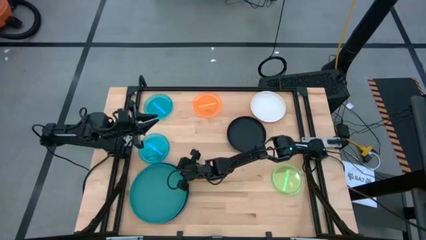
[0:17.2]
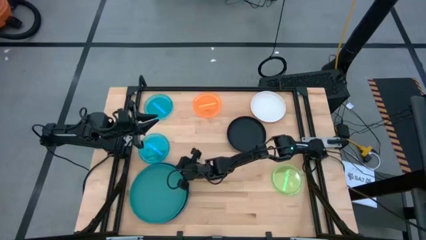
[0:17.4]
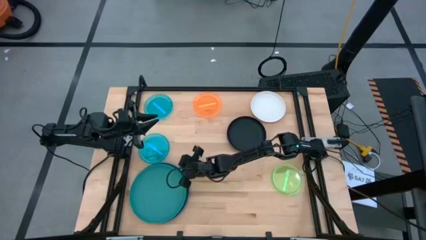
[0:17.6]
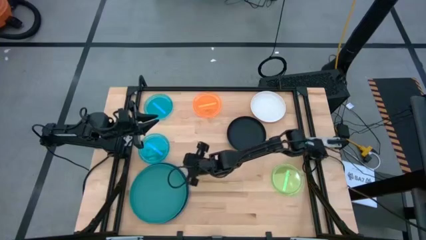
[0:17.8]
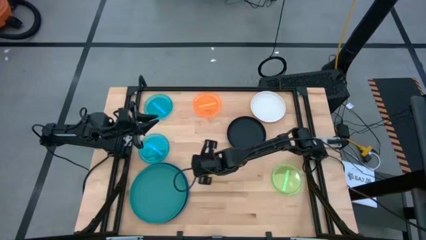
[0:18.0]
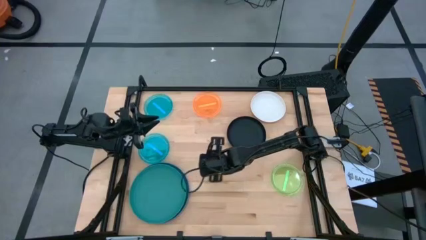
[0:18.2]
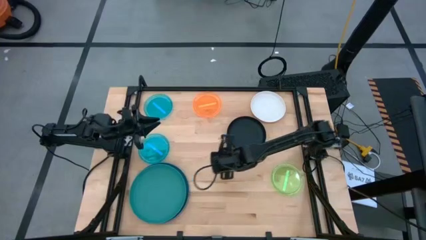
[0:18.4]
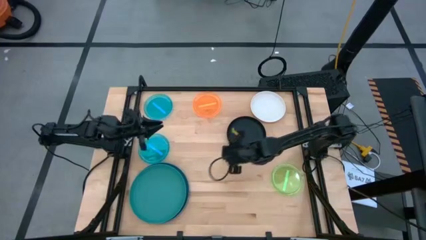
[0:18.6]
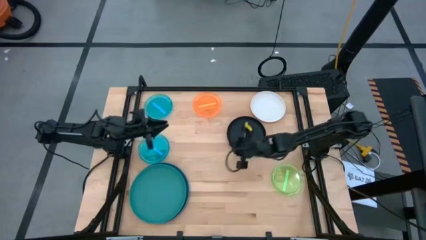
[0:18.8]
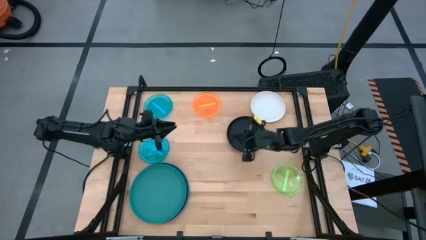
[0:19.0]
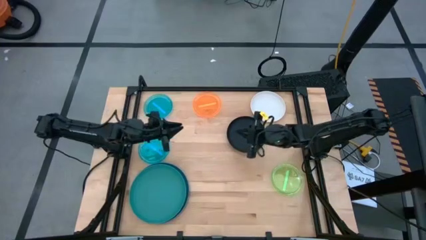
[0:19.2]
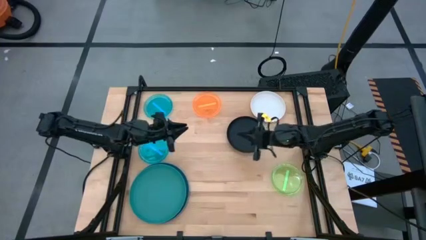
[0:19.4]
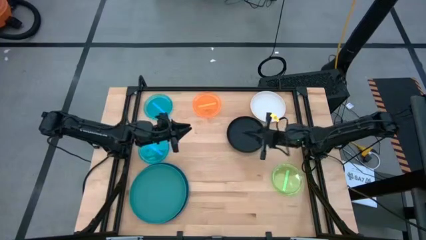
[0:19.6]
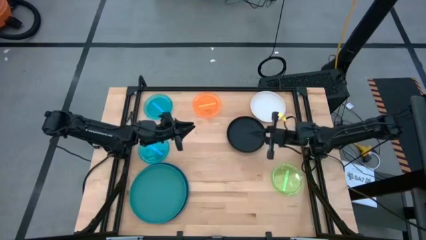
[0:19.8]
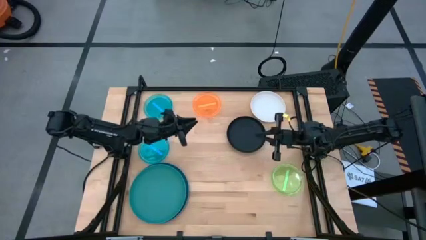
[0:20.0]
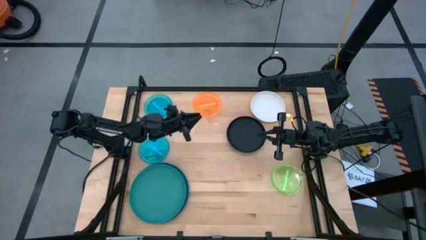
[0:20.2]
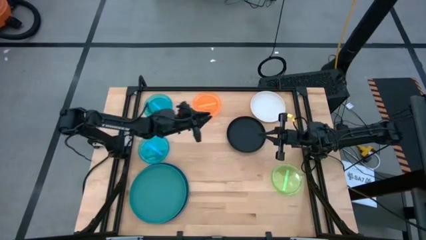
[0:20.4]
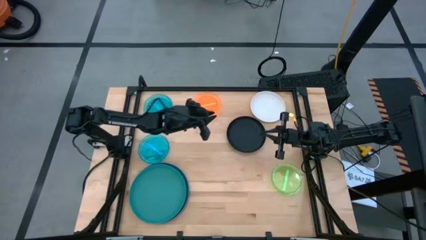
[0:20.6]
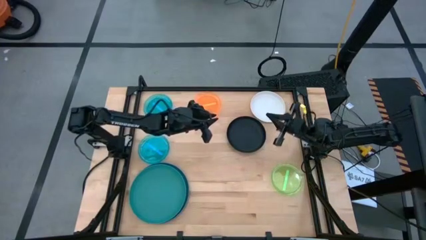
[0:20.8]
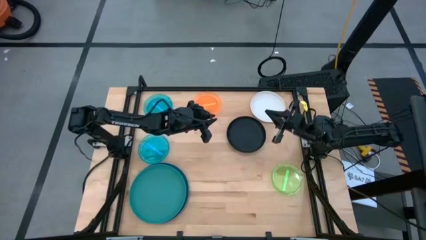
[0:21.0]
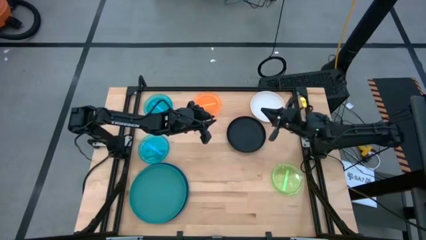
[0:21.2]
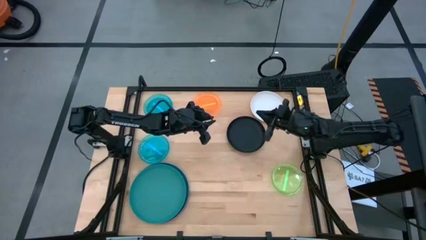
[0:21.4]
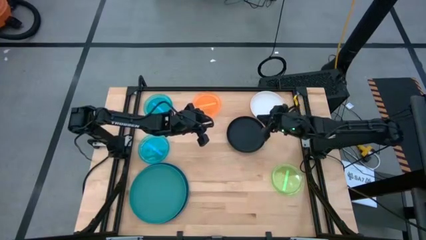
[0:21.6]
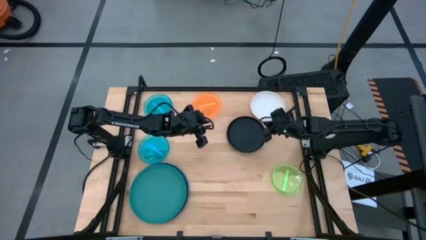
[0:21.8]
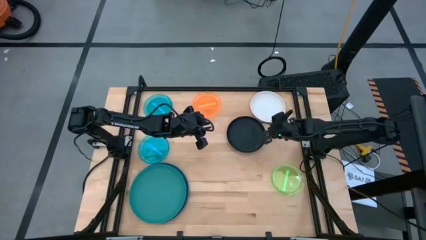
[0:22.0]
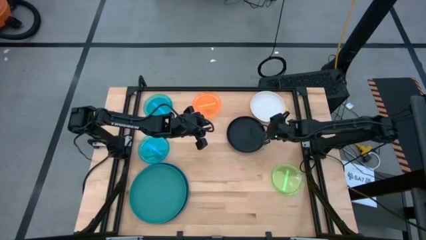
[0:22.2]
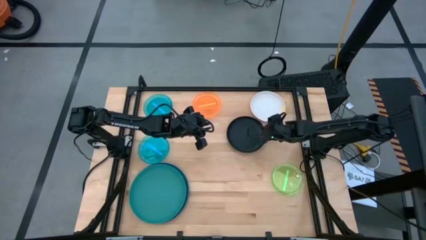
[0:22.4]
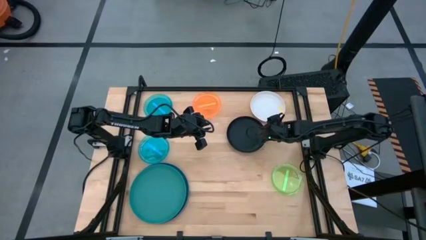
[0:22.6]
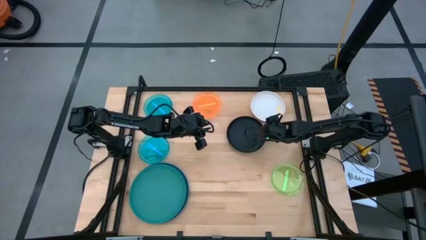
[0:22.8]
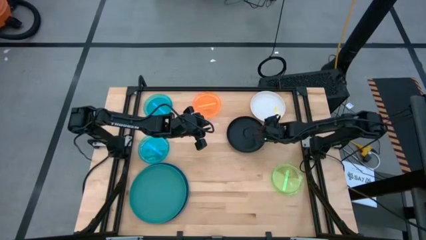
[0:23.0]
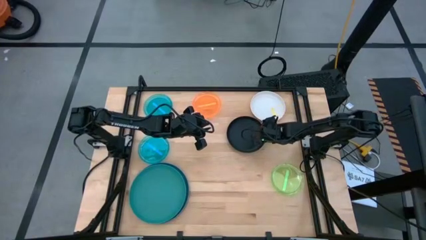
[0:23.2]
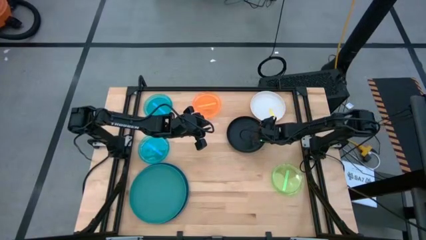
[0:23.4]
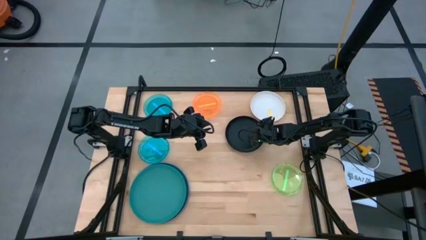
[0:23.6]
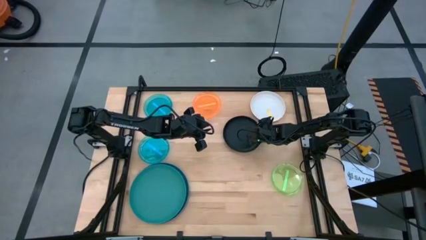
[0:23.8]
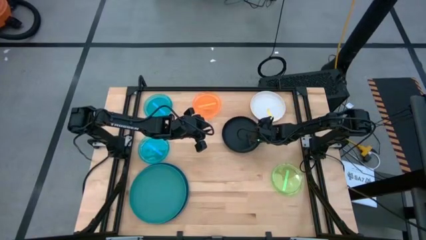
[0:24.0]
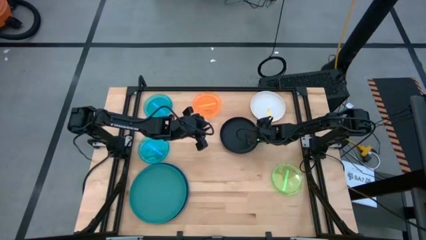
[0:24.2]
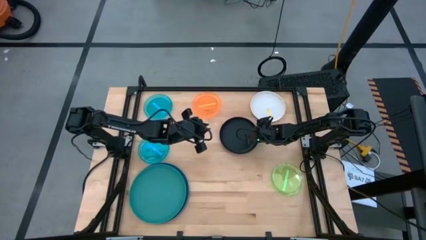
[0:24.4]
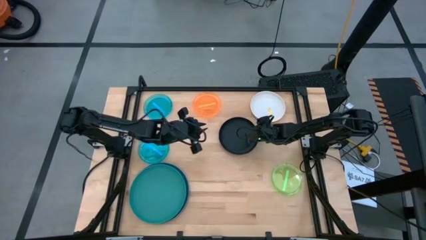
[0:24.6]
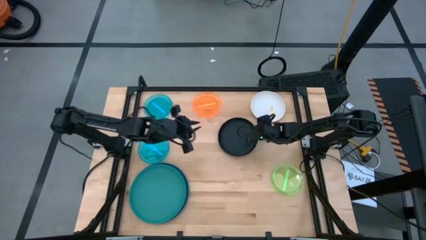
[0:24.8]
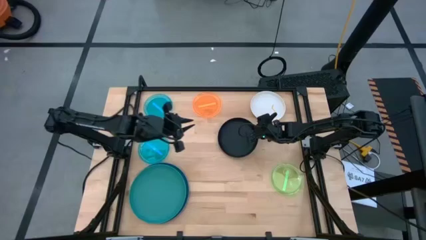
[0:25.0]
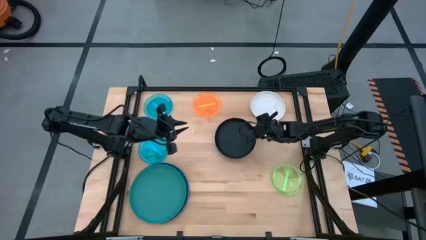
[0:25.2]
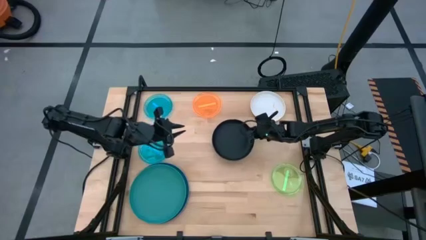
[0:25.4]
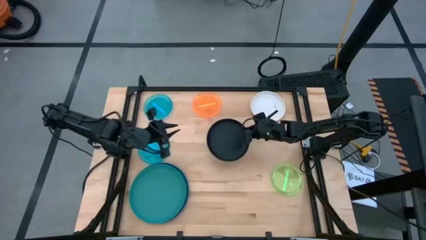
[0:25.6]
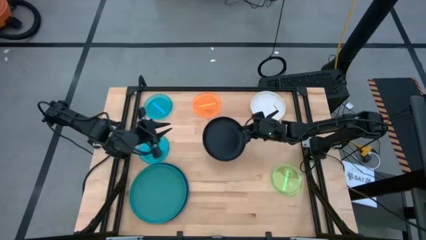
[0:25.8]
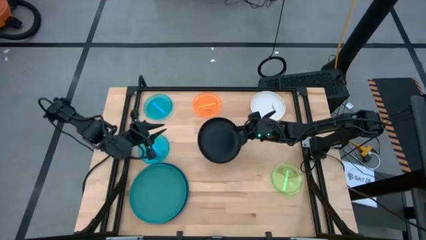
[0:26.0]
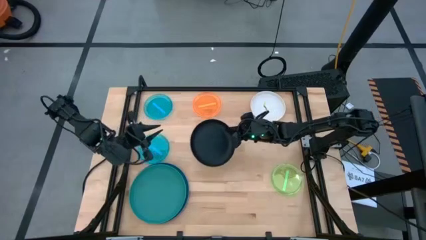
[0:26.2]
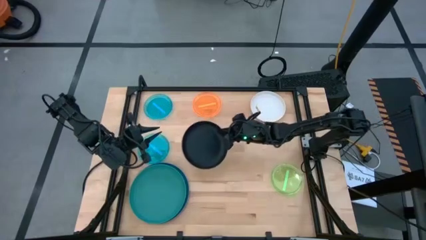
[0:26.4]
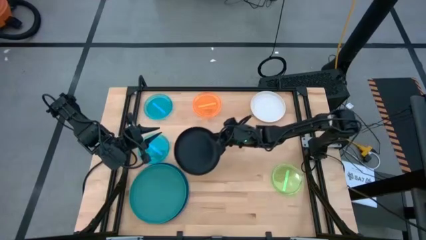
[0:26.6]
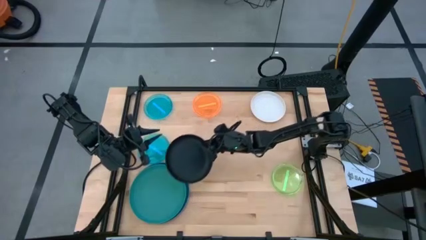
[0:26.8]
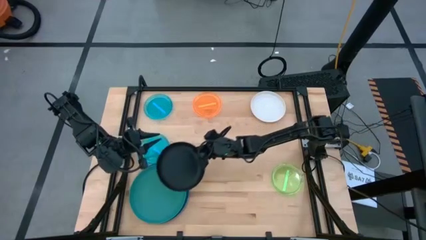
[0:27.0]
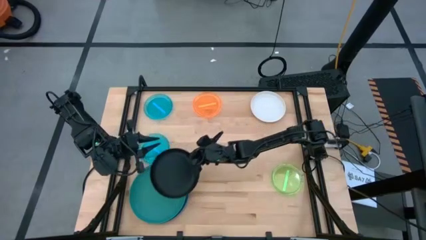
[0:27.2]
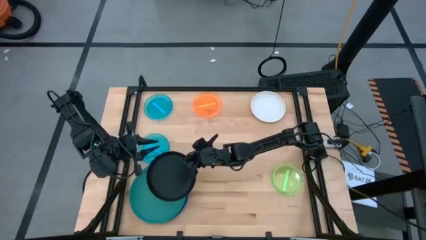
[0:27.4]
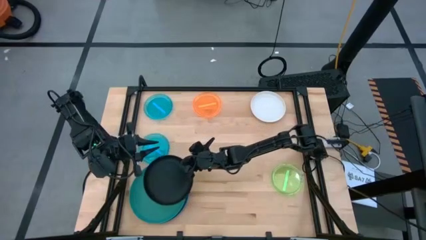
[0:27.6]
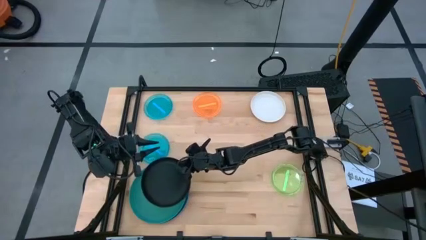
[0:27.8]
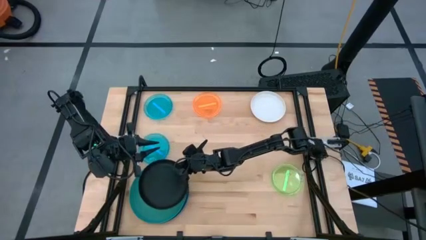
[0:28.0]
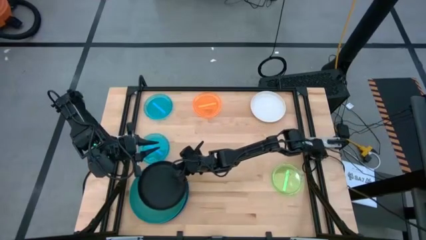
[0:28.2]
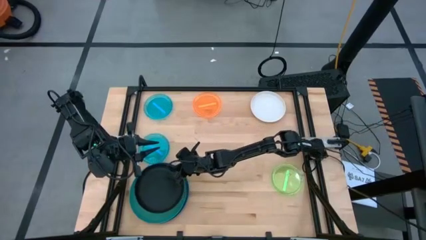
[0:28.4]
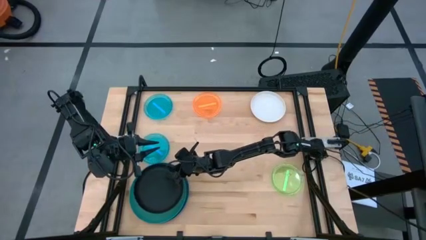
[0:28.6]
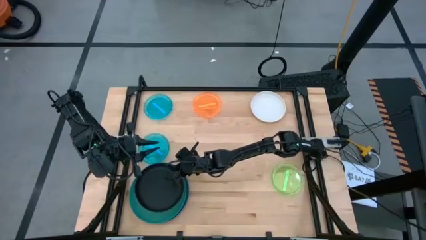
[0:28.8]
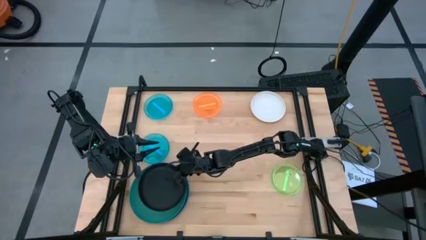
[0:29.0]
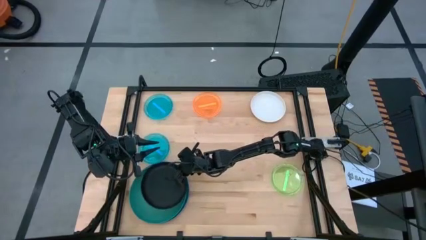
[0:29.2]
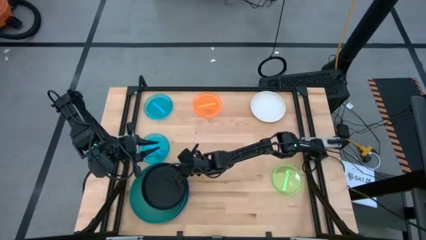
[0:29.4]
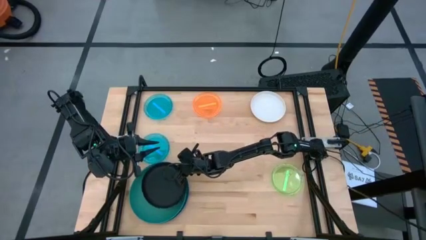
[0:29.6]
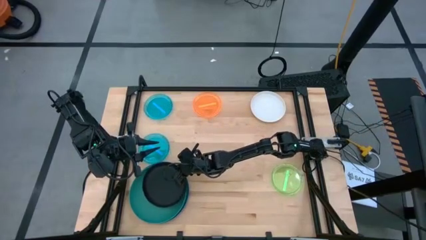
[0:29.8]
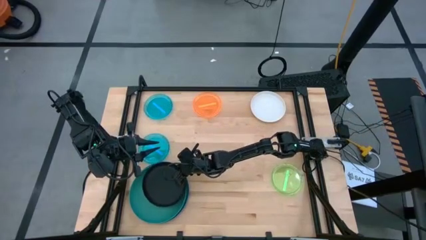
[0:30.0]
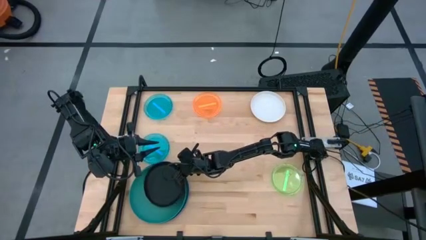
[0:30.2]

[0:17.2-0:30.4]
Task: Stack plastic plates
Stack the black plate on top of the green plate

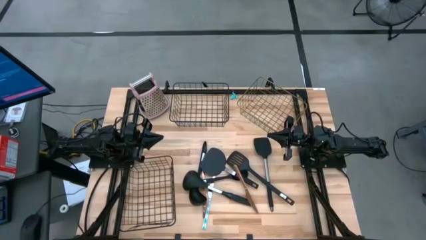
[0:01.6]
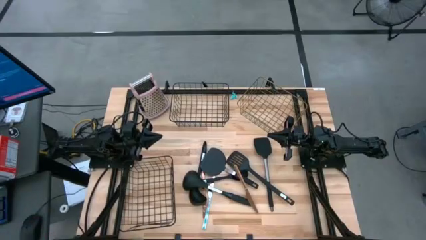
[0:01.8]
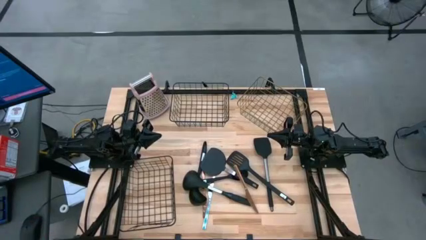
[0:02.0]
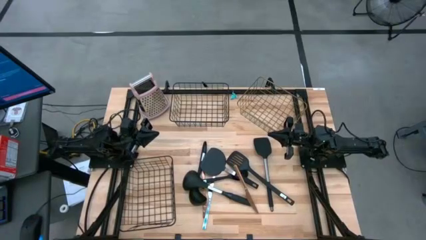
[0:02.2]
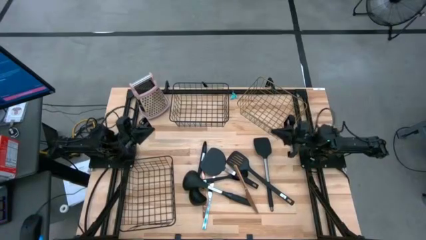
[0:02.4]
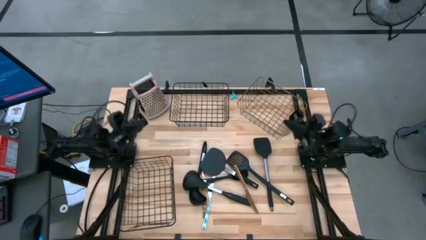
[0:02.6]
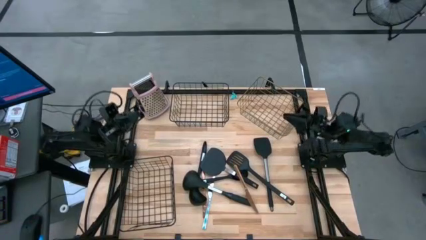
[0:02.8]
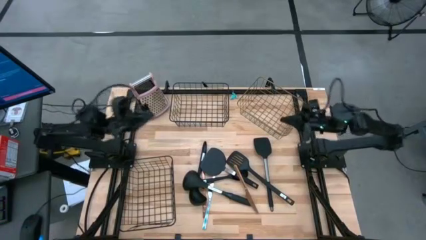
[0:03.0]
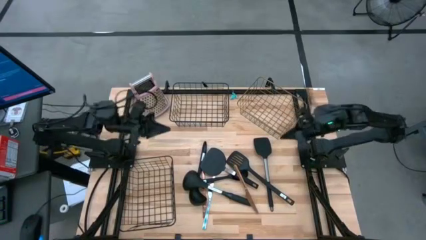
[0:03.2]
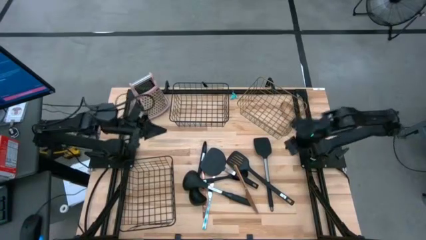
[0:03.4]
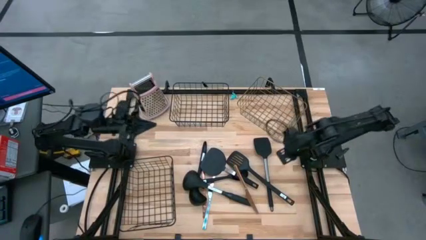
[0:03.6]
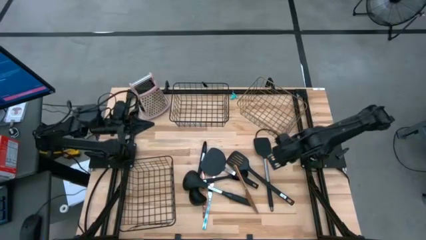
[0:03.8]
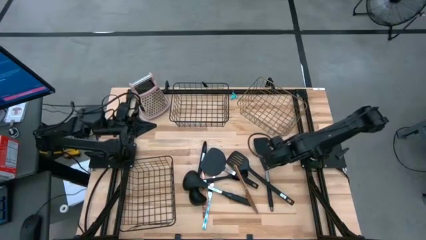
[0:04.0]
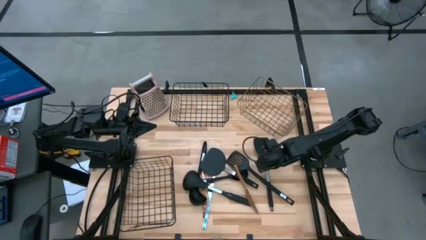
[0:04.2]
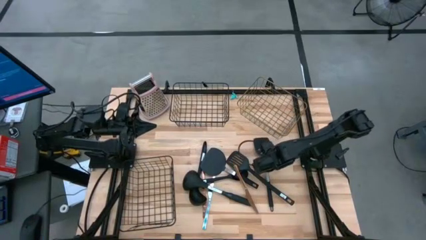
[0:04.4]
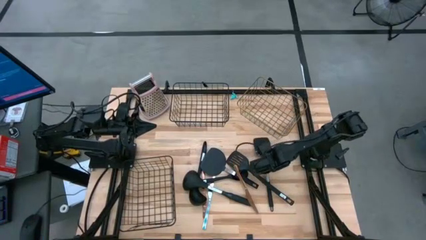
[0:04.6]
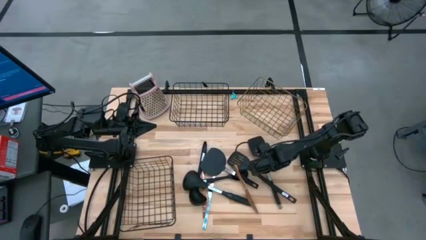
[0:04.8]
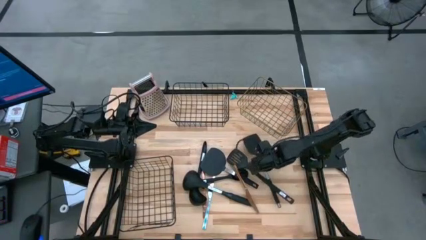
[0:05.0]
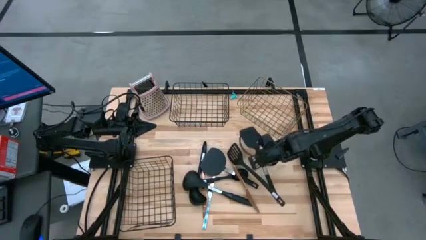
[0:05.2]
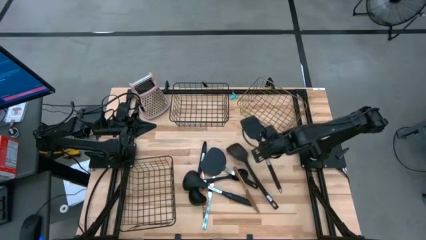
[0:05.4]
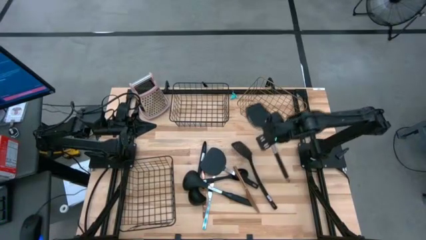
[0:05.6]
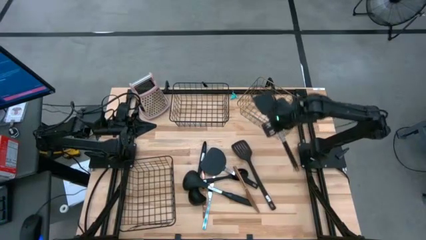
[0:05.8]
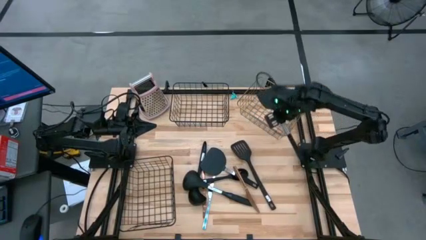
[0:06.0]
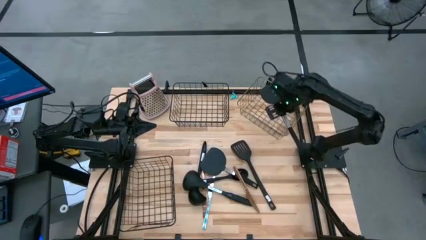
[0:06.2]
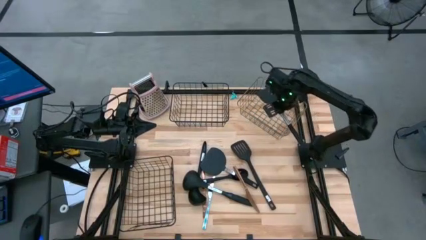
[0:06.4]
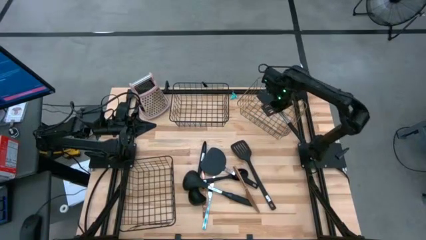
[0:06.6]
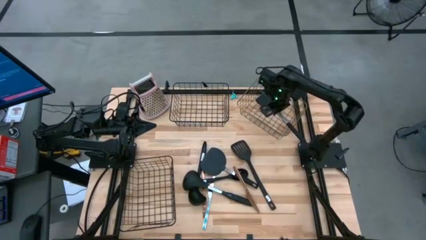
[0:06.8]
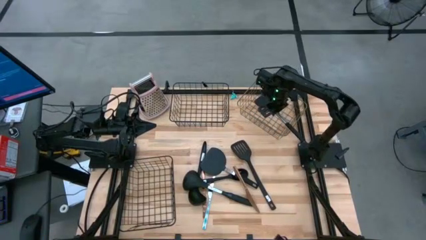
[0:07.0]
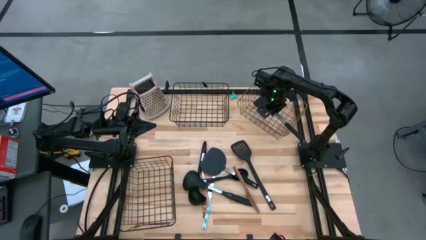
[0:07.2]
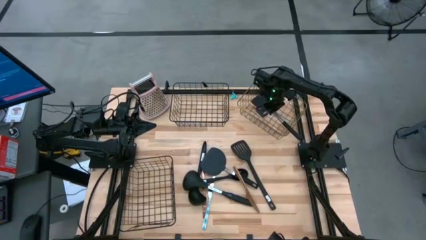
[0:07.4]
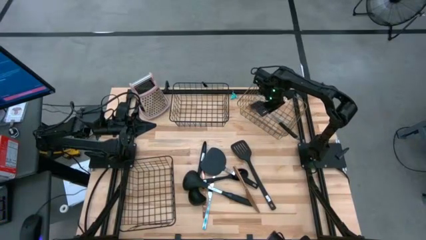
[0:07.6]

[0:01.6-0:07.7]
Task: Pick & Place Kitchen Items
Put the black spatula into the brown wire basket
